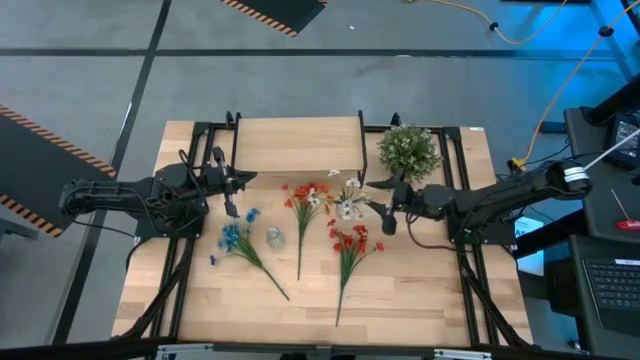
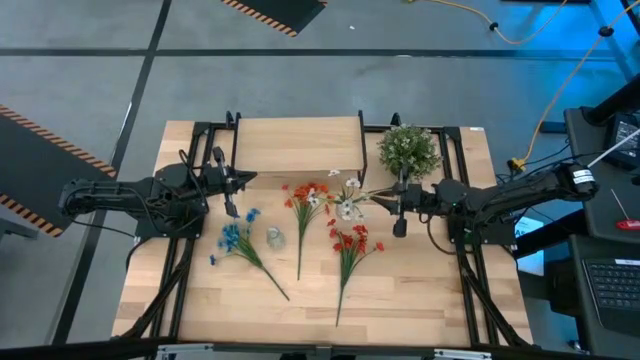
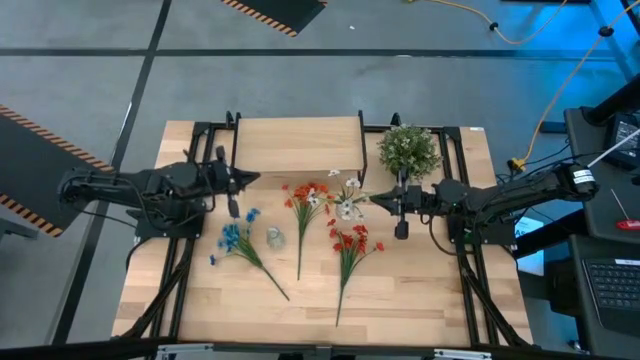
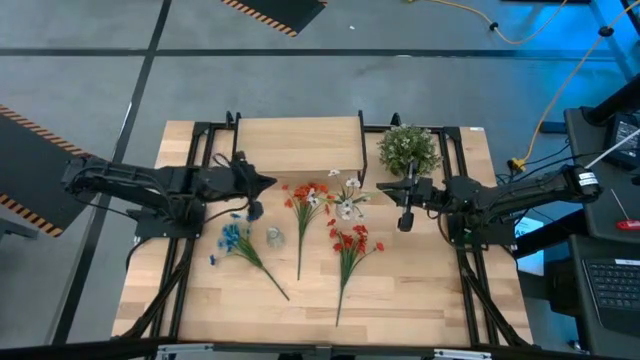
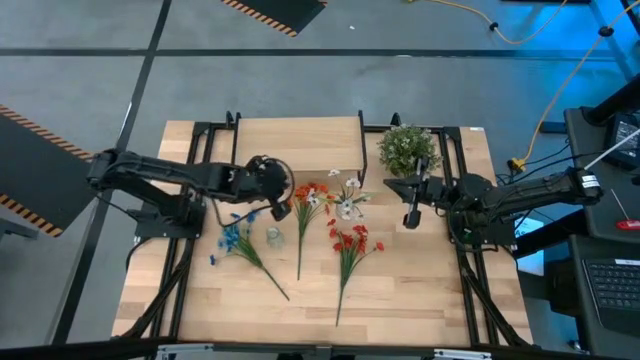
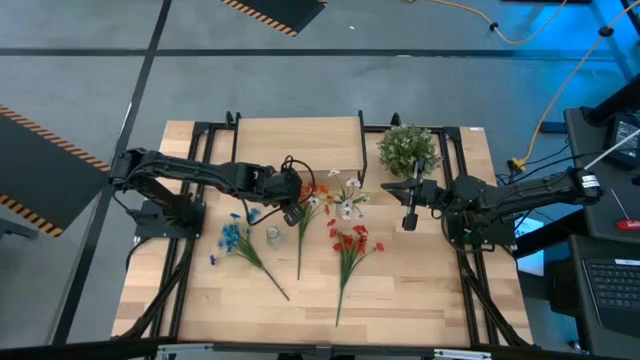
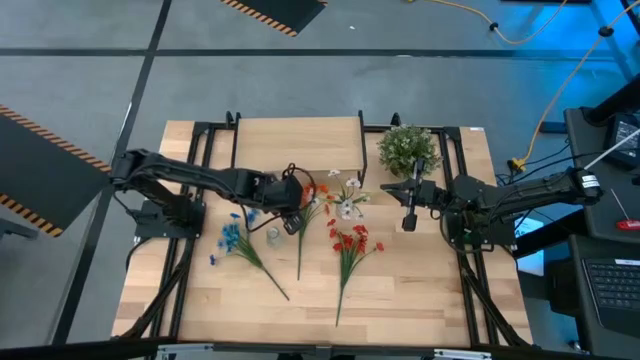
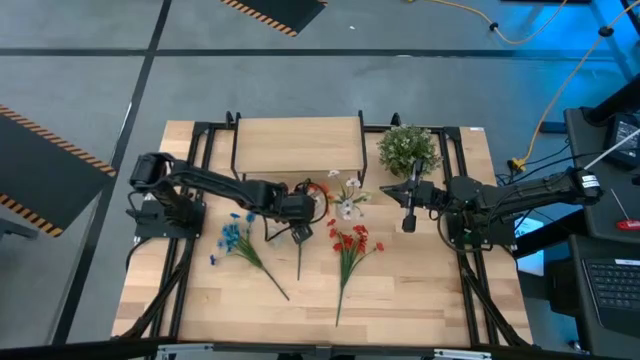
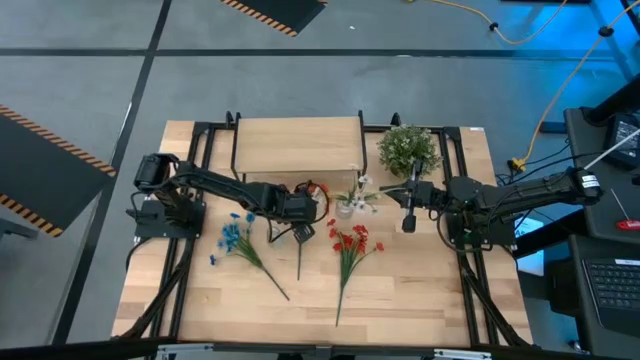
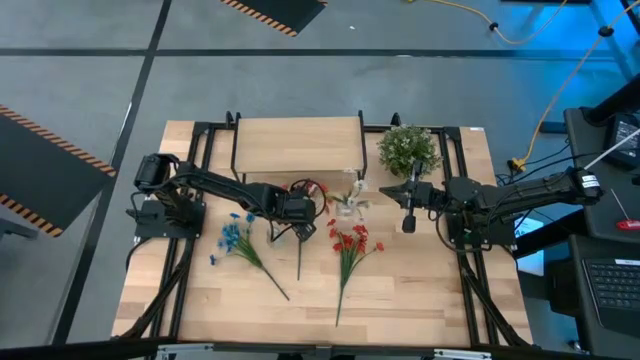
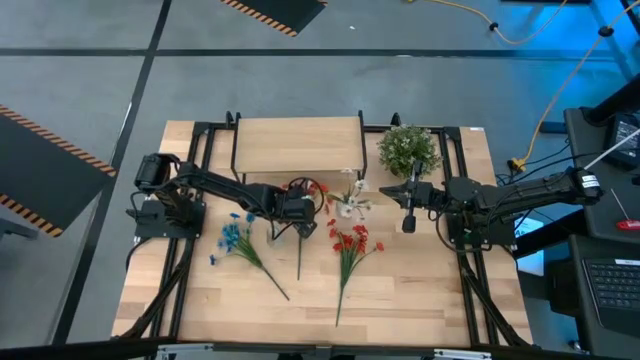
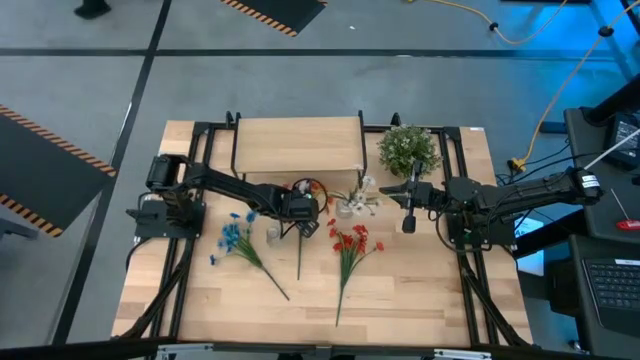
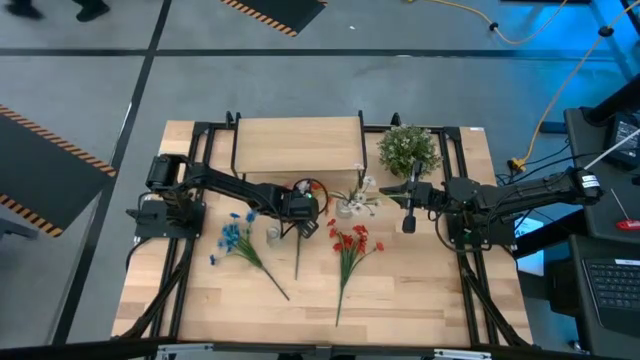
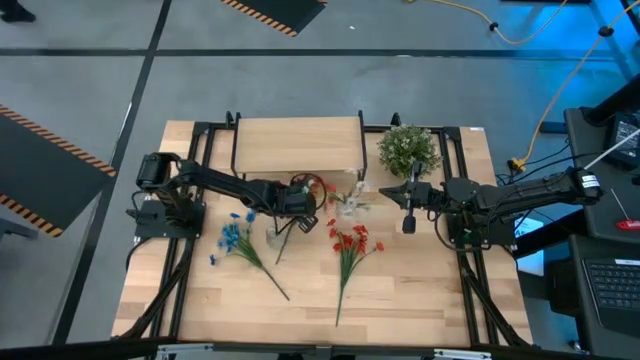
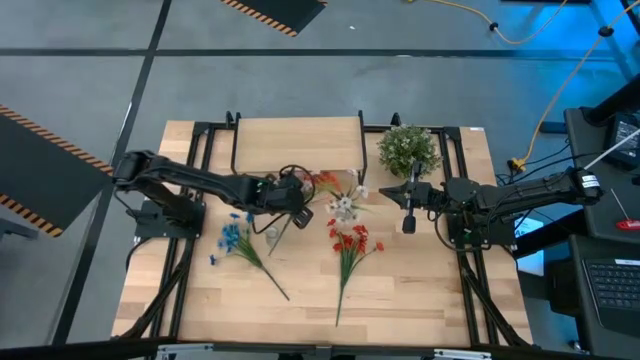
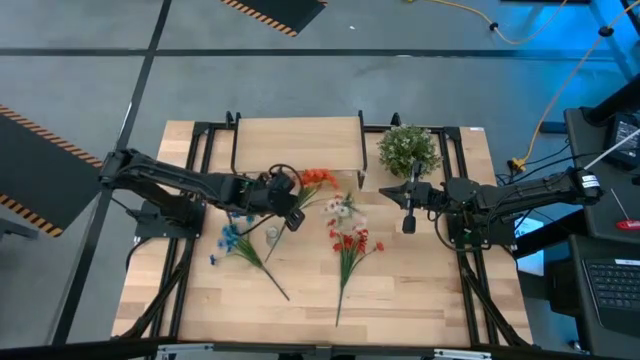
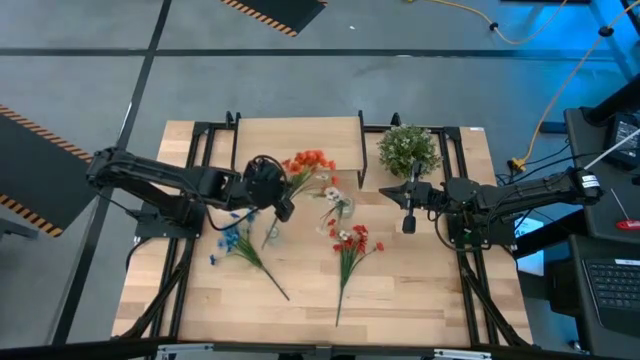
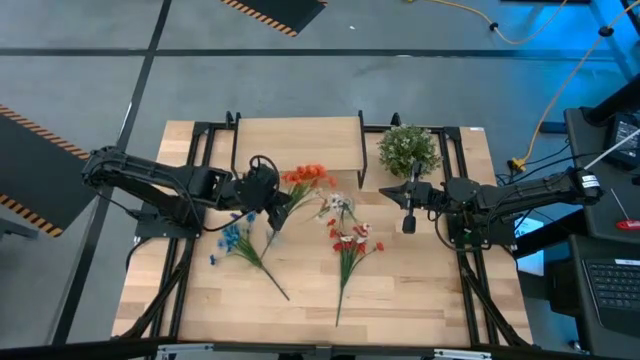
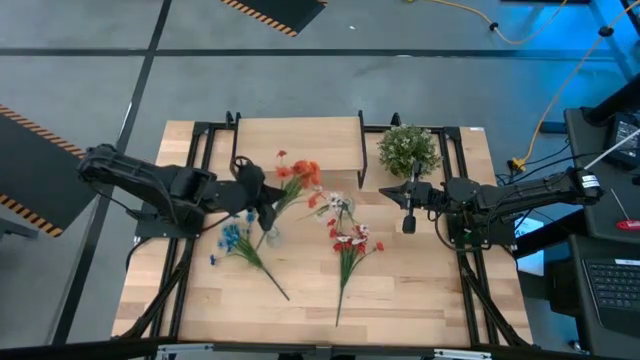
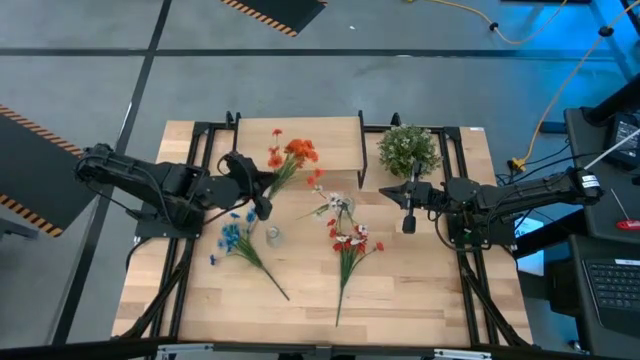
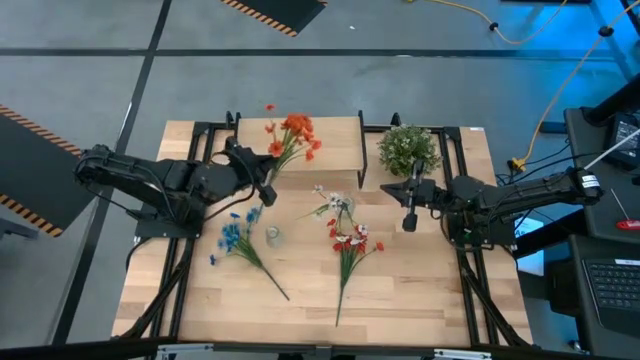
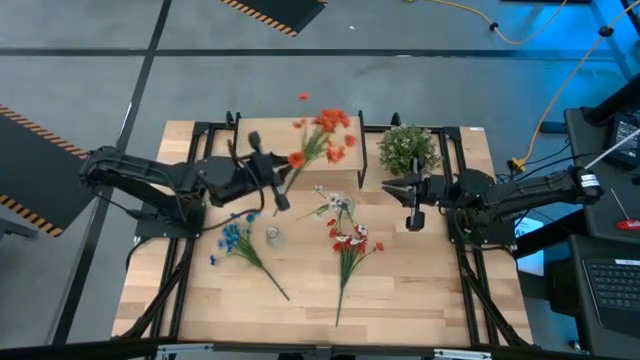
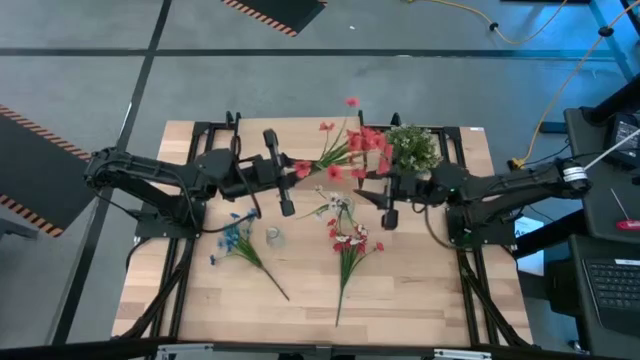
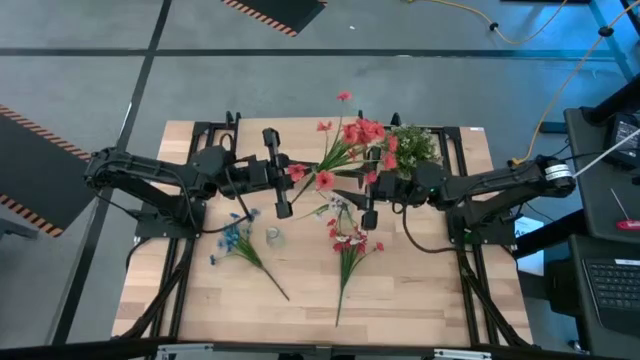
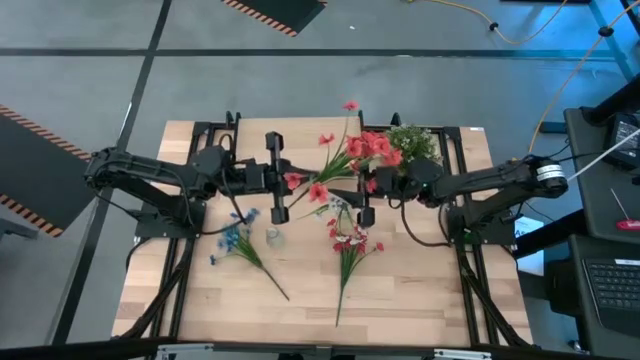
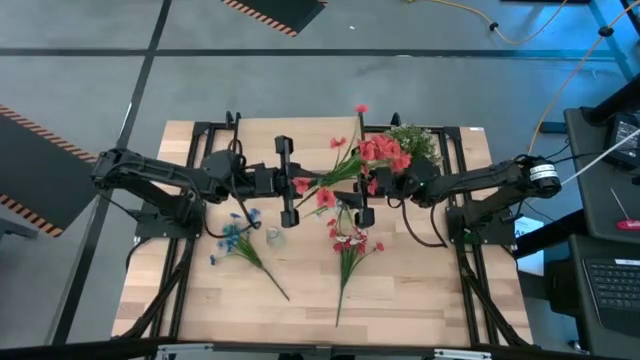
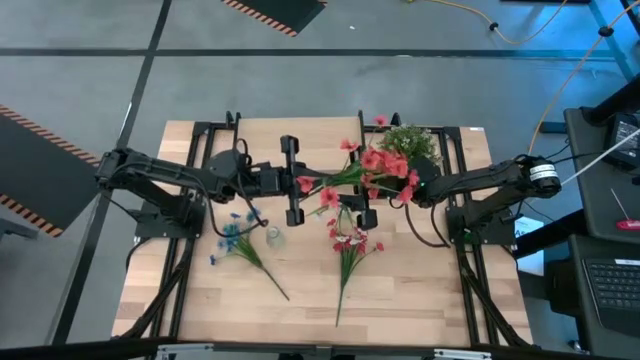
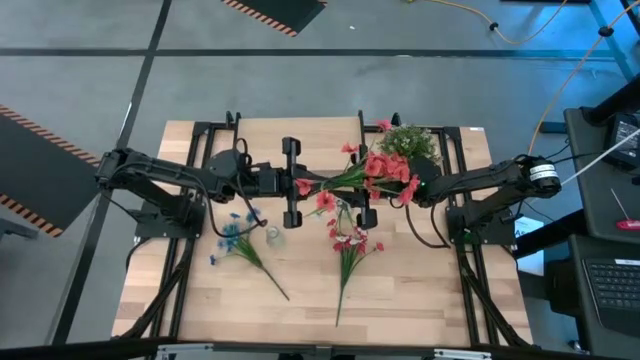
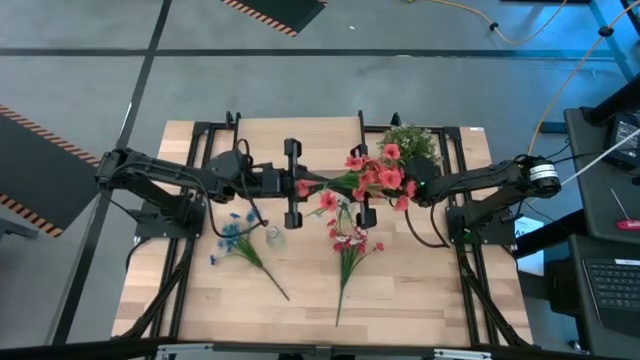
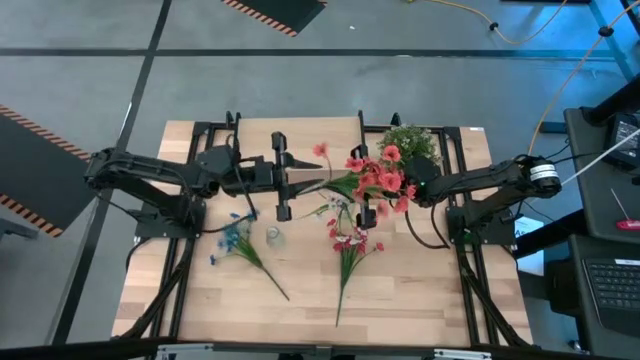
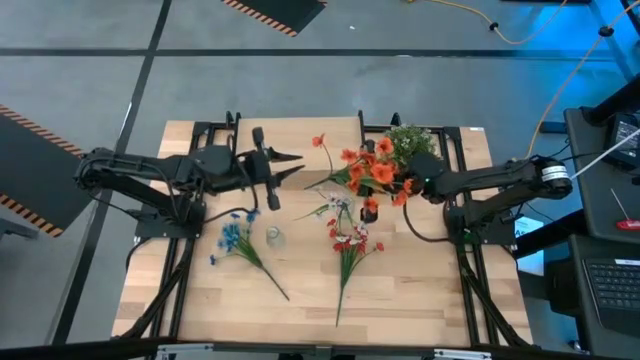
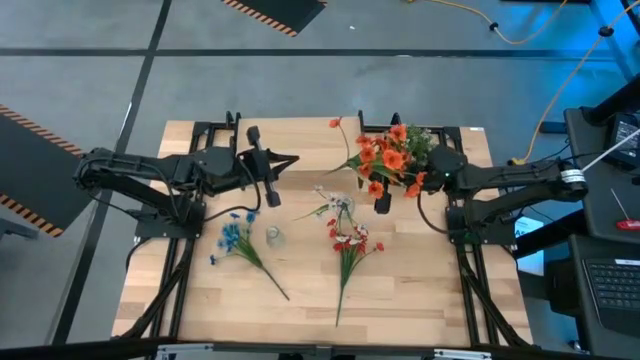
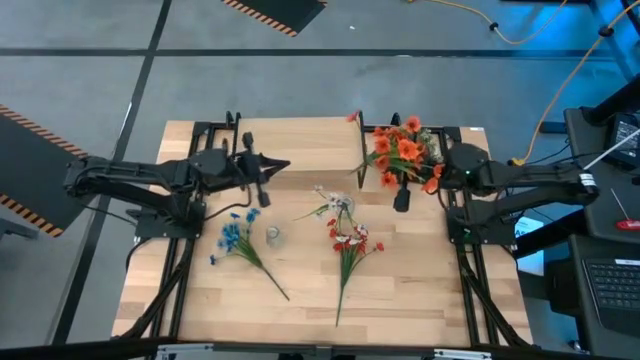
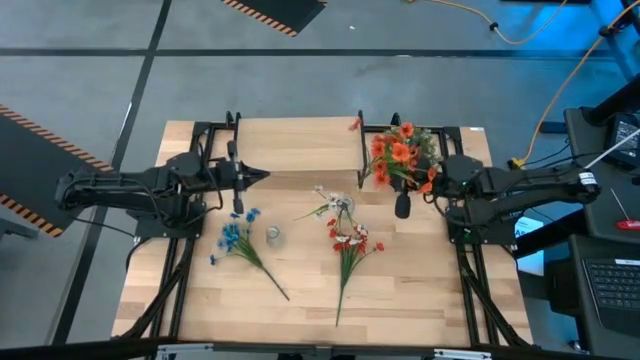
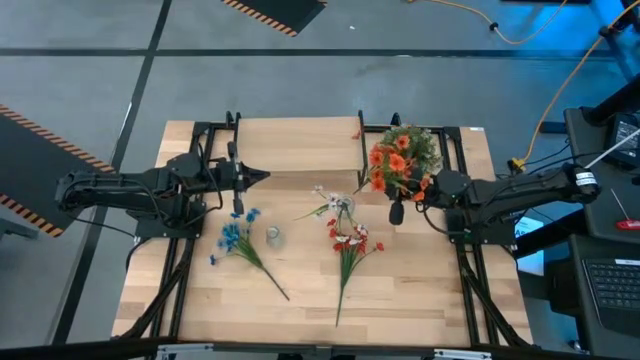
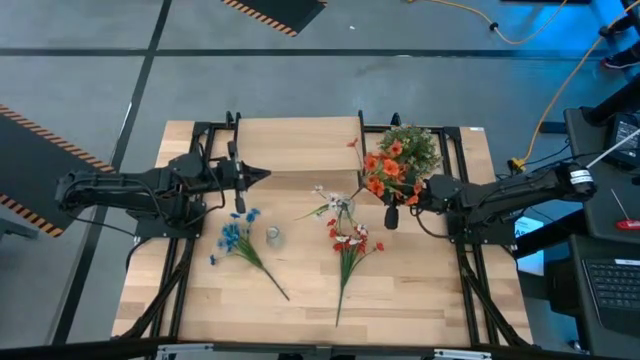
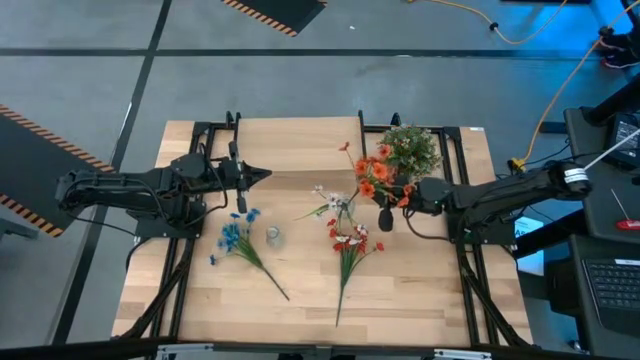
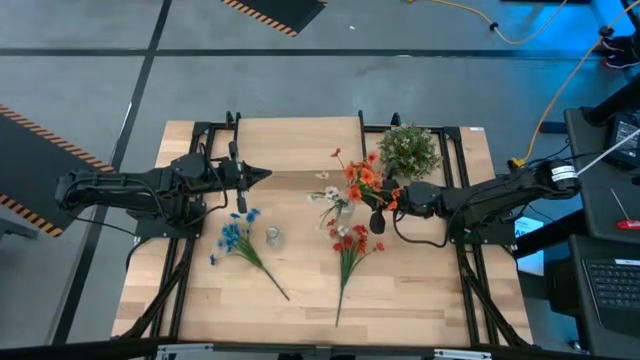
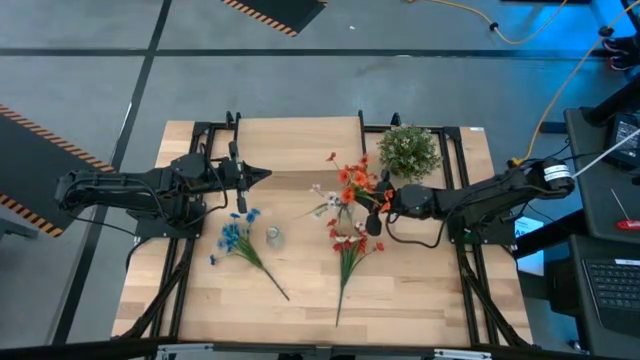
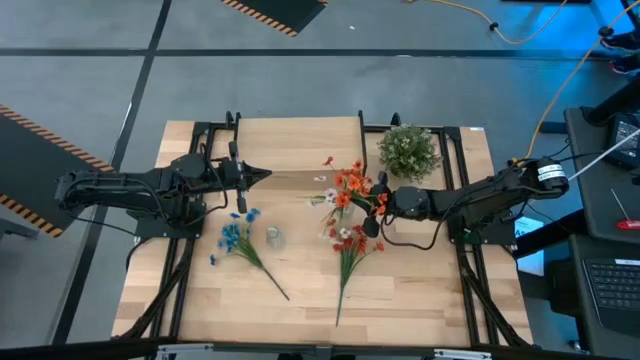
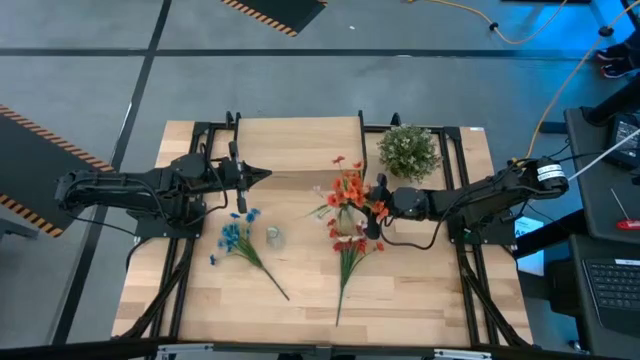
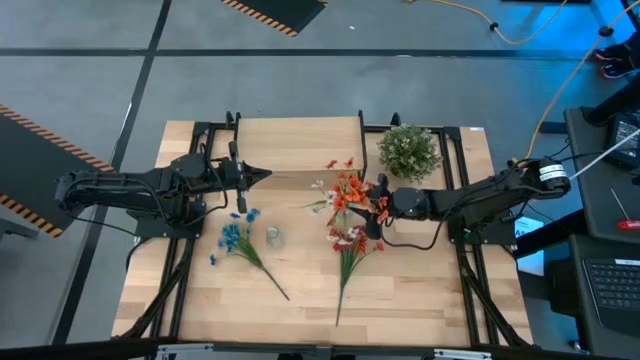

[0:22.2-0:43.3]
Task: Pick and place flowers into a vace then onto a shelf
Put the left orange flowers into the right transparent vase
